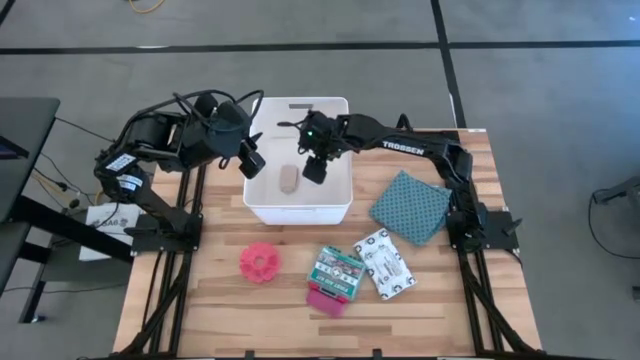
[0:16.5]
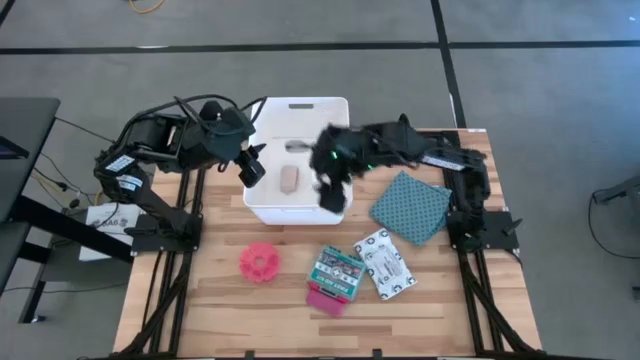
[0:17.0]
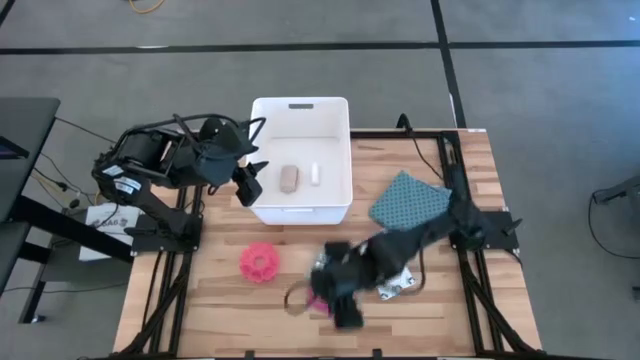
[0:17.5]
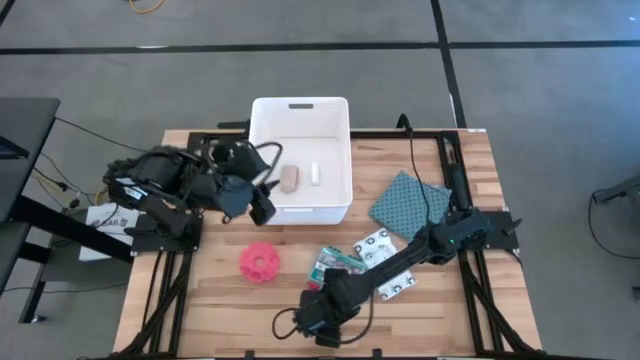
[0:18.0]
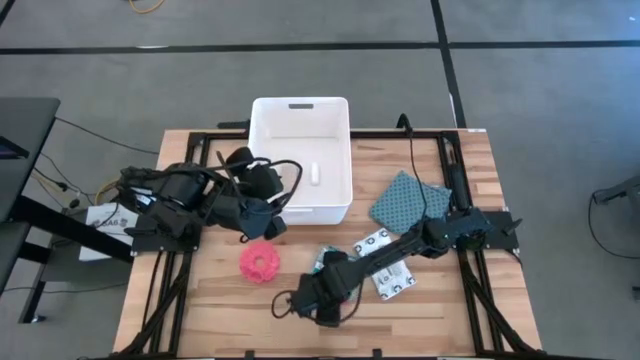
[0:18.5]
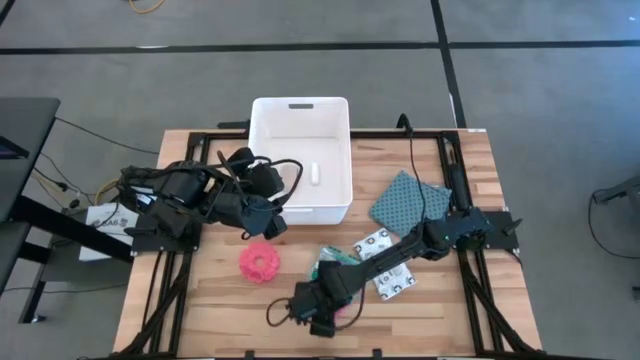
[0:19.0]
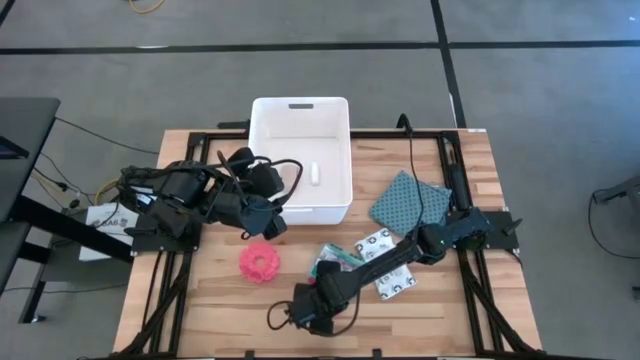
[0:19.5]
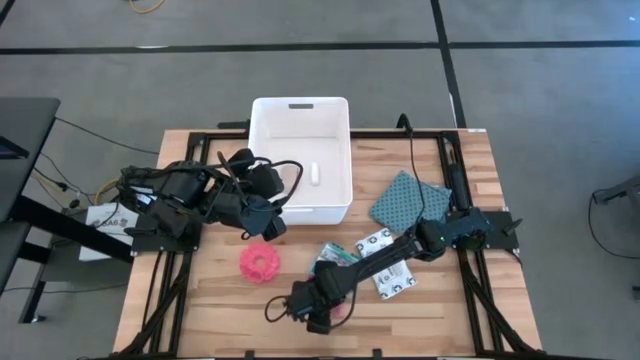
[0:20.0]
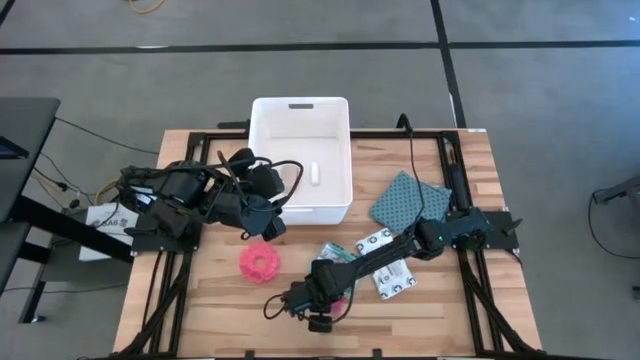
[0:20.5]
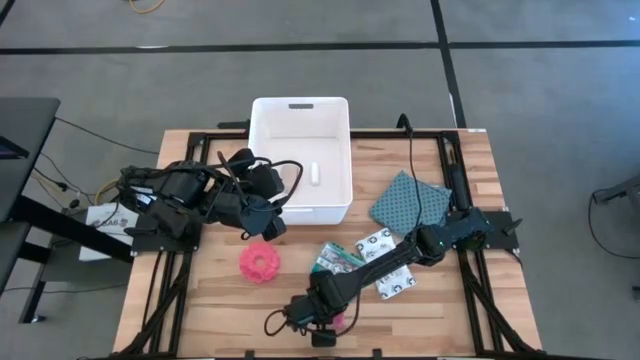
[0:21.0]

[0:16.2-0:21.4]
Task: Pick & place medical supplies in basket/bin
Put the pink bandage into the white bin

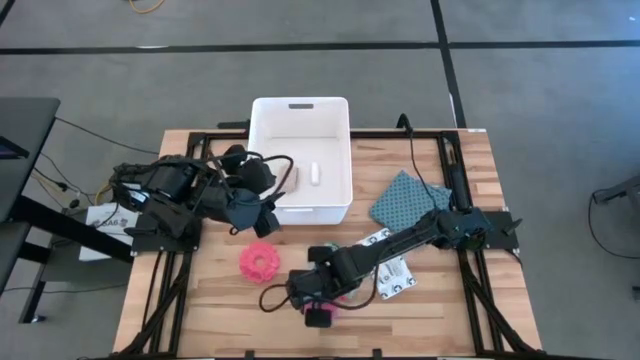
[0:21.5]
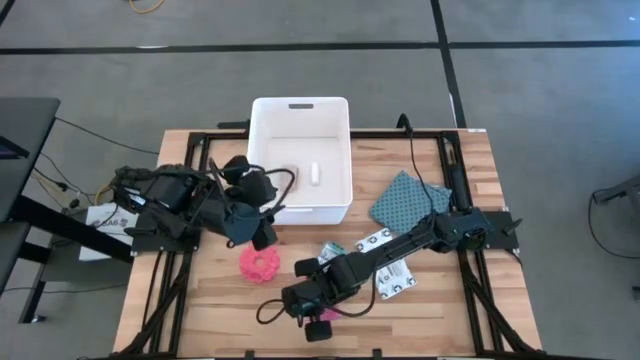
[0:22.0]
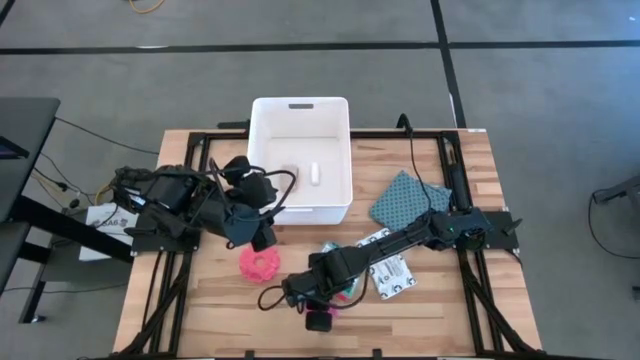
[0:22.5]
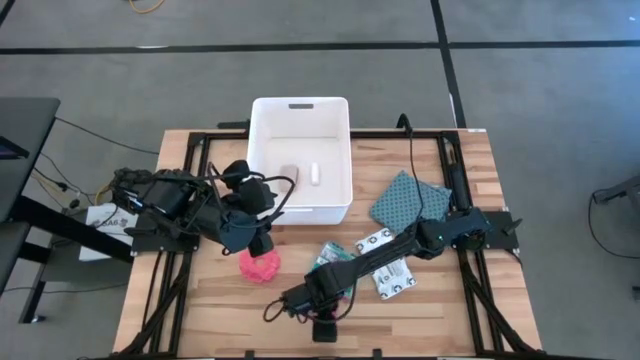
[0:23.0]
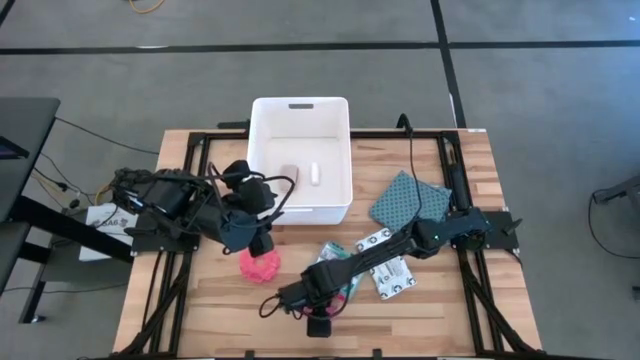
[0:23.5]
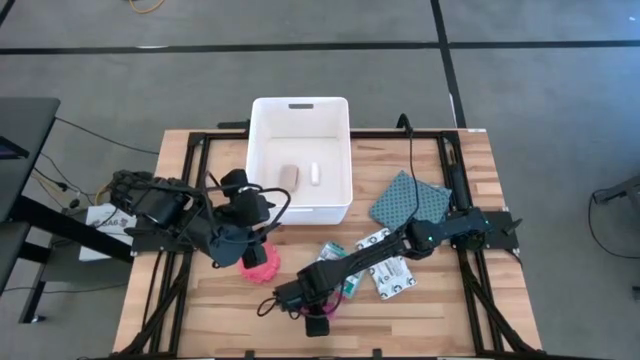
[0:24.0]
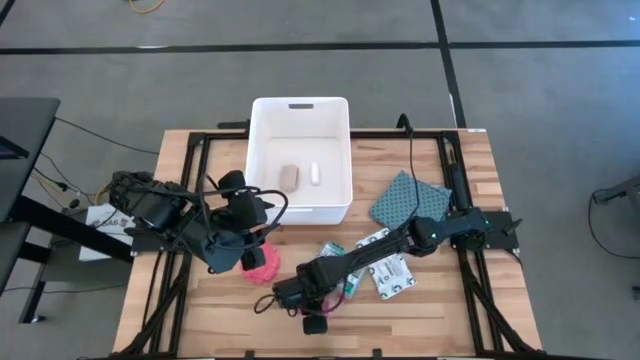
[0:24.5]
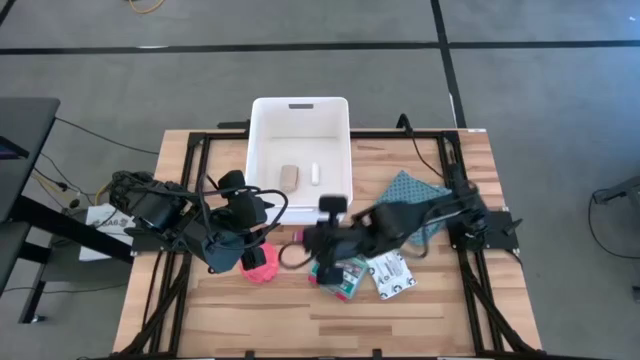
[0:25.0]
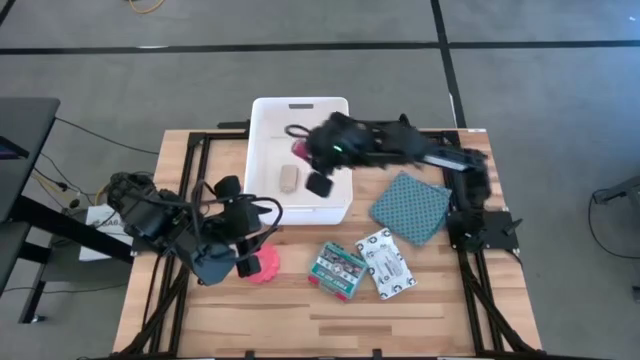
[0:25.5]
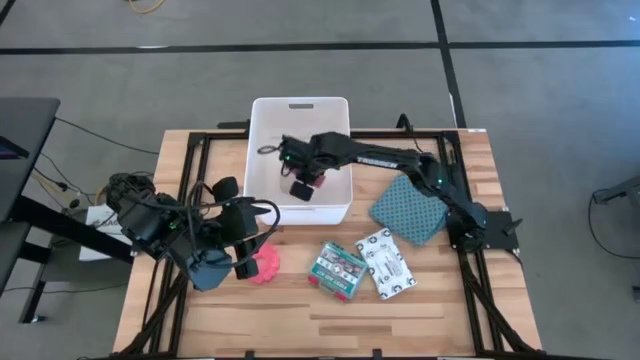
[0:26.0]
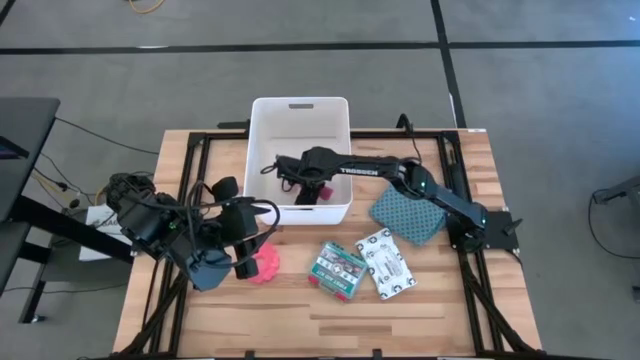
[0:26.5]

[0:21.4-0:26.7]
Put the pink bandage into the white bin

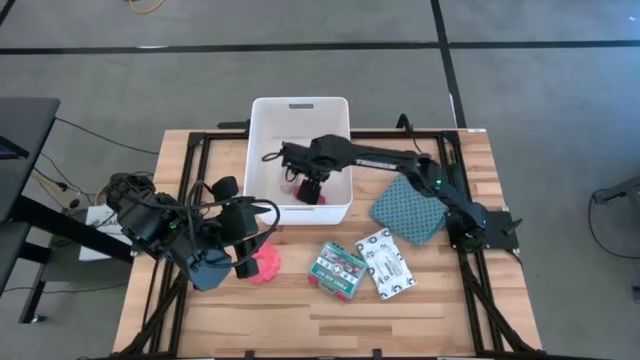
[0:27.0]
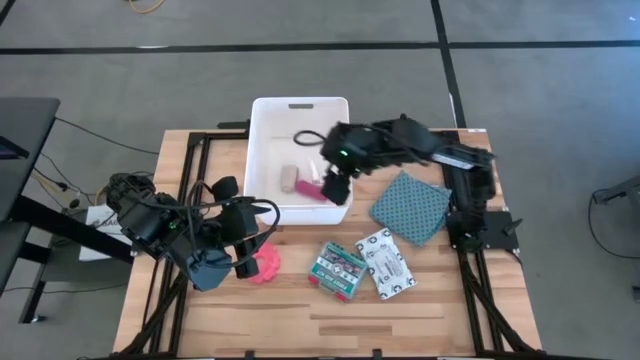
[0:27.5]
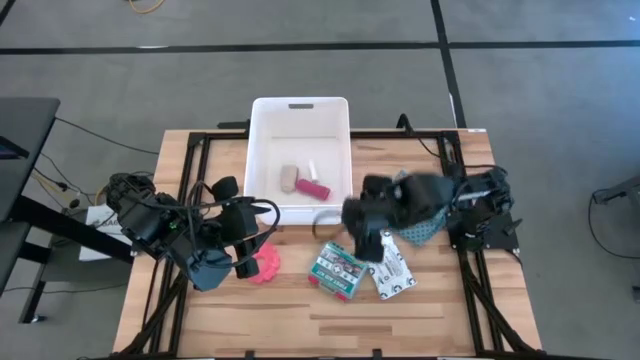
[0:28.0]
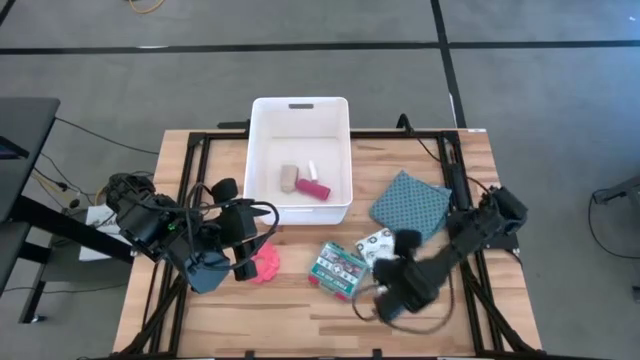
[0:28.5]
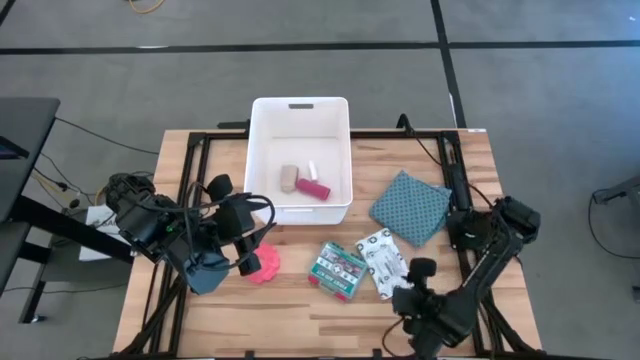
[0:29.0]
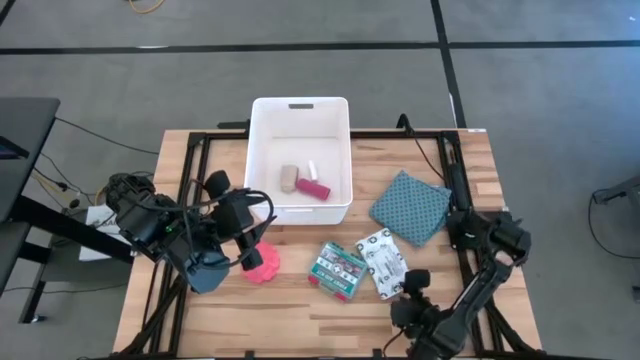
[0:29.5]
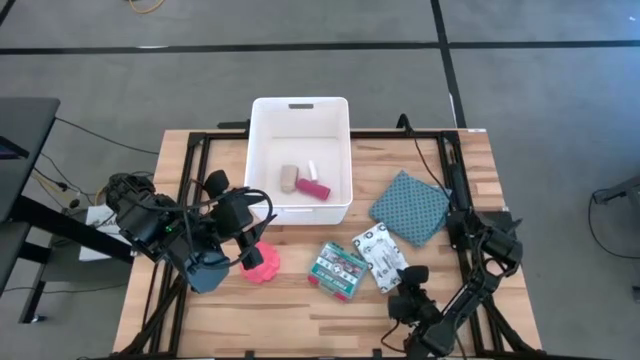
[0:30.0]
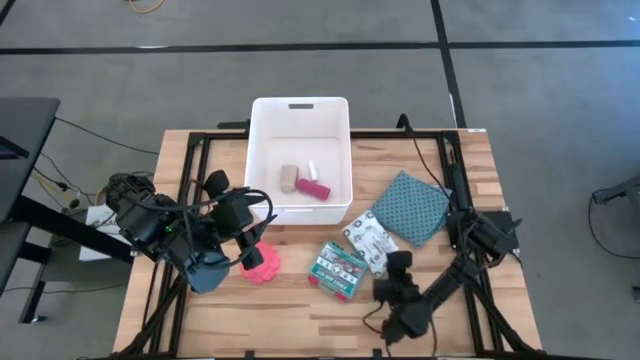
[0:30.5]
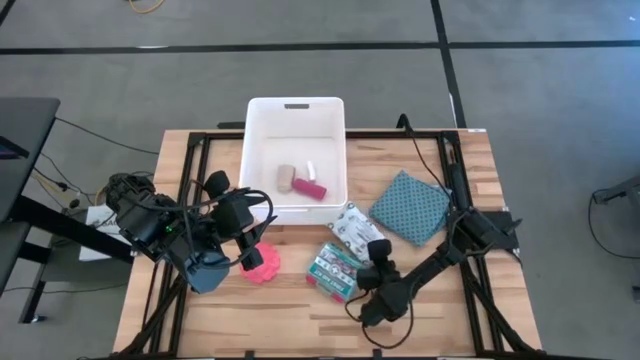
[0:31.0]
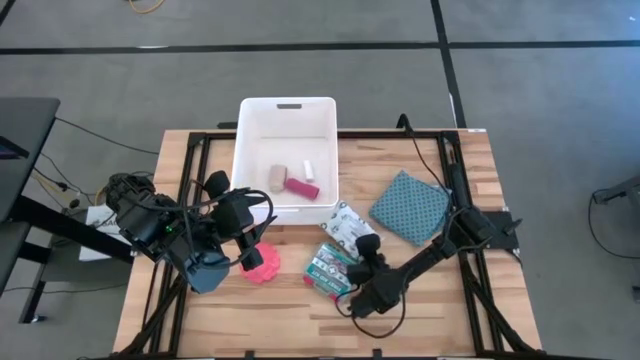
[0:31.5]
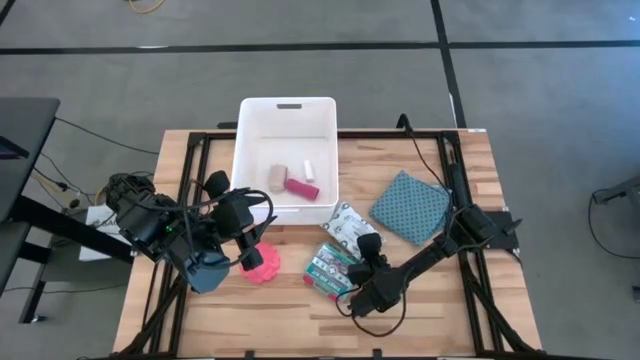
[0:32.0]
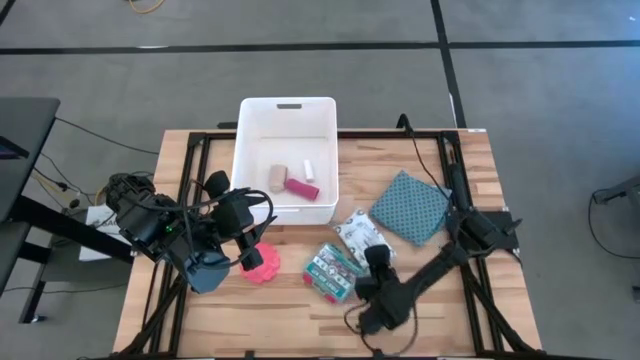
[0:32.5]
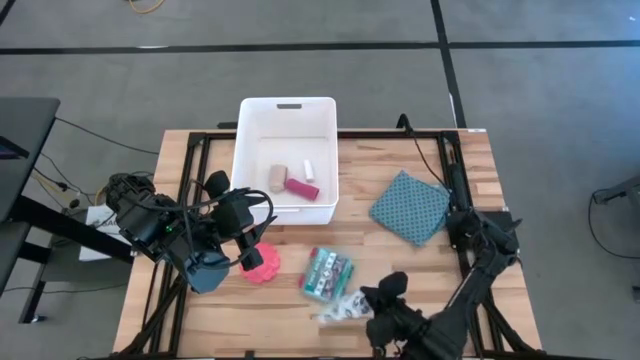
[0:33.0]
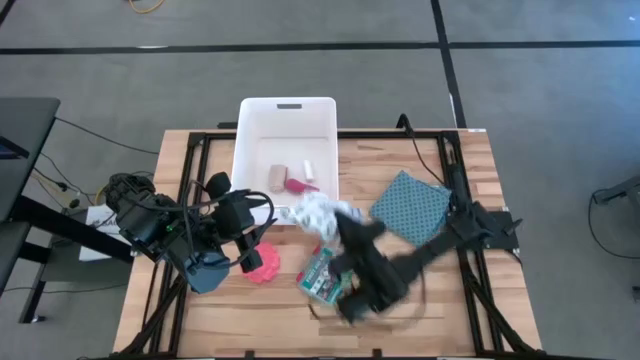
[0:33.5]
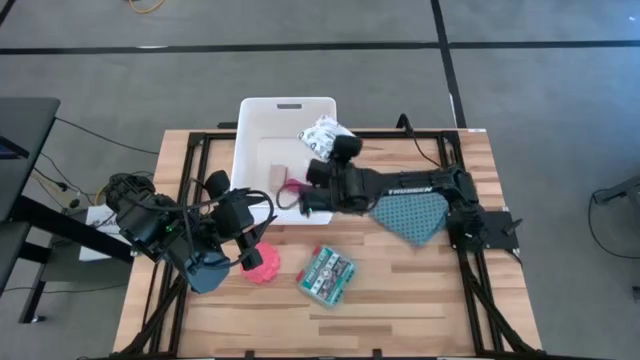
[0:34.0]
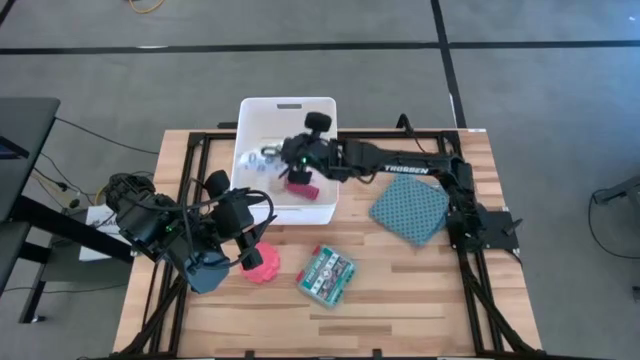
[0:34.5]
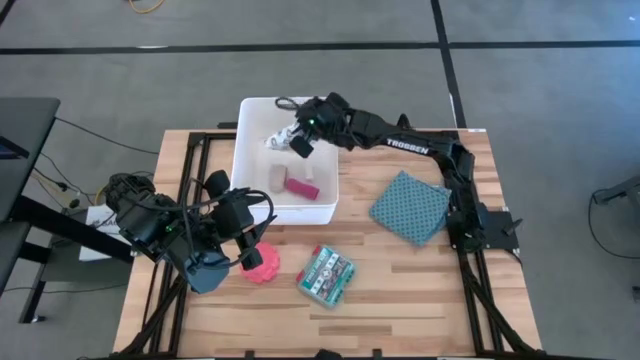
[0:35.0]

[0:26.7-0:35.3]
Put the mailer bag into the white bin

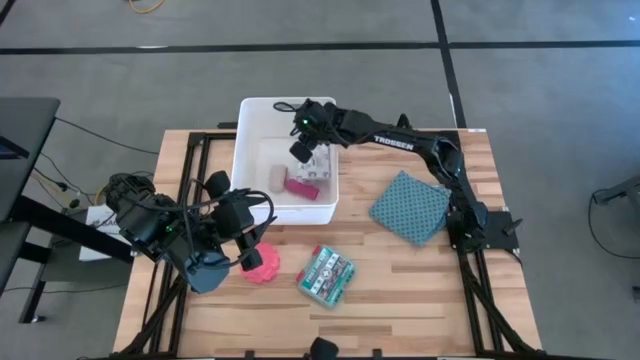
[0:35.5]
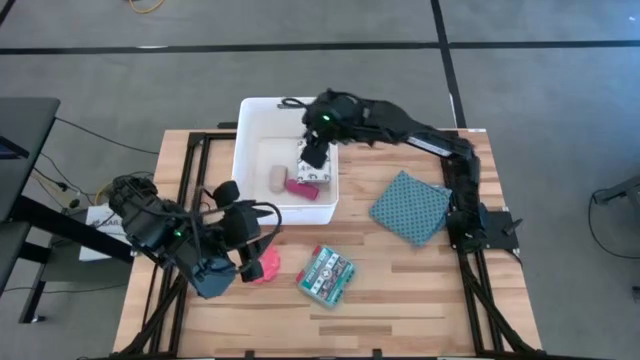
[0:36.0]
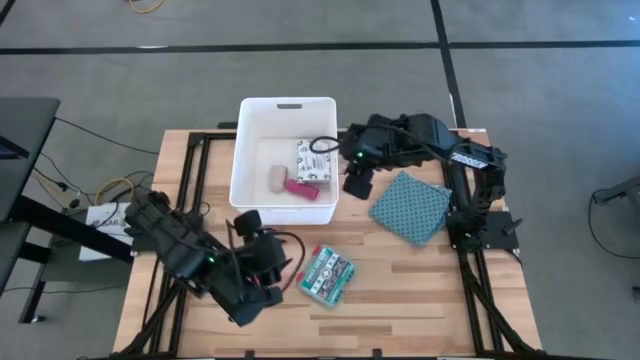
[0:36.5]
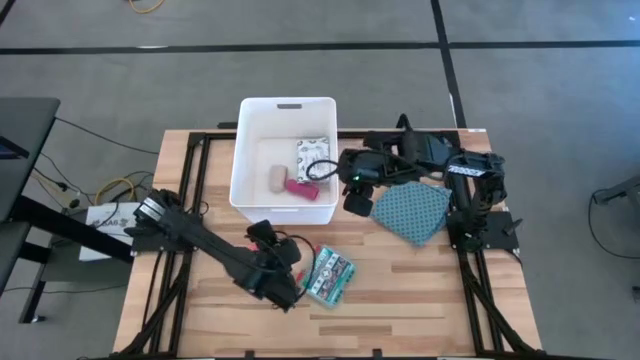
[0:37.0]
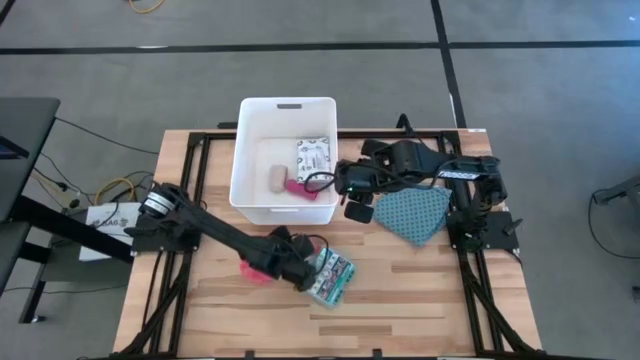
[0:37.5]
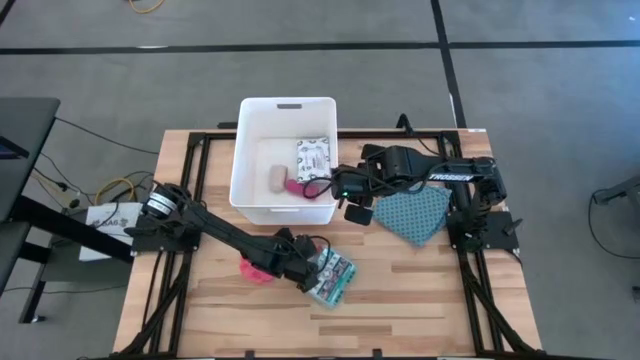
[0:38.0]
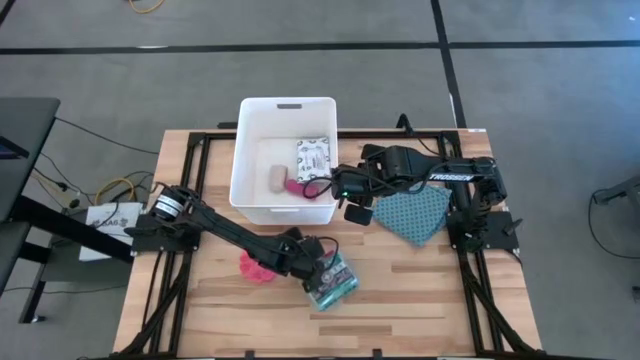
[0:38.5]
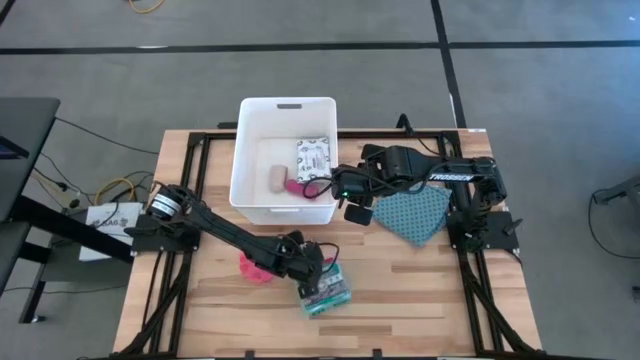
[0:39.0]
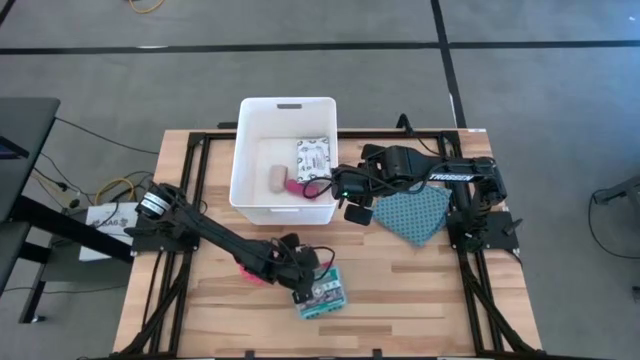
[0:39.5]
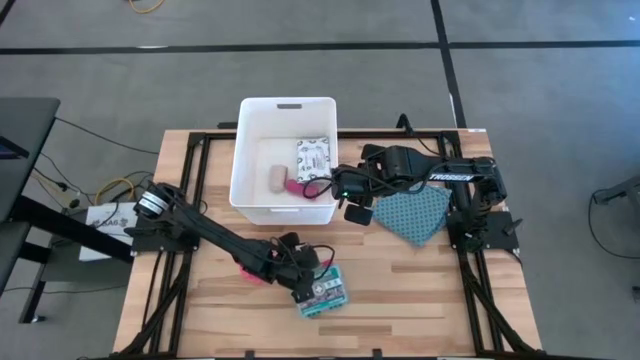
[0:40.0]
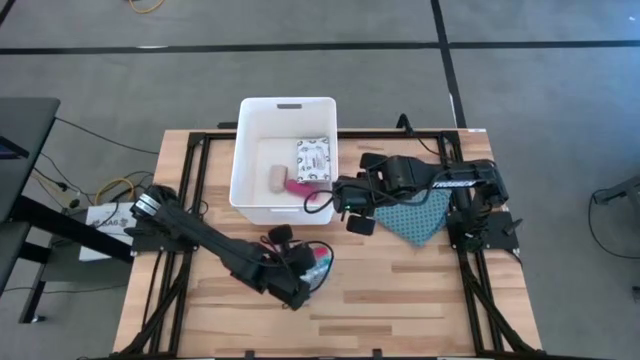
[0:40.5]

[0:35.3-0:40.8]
Put the first aid kit box into the white bin
